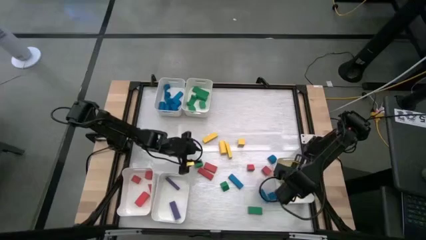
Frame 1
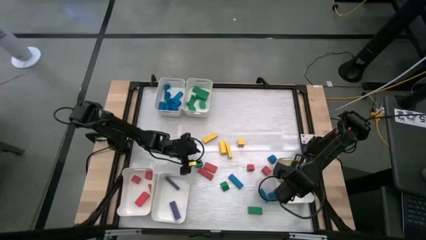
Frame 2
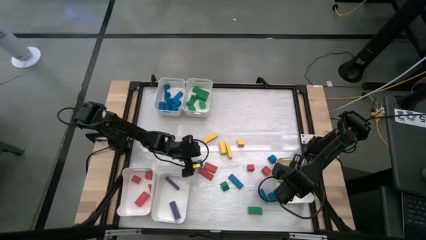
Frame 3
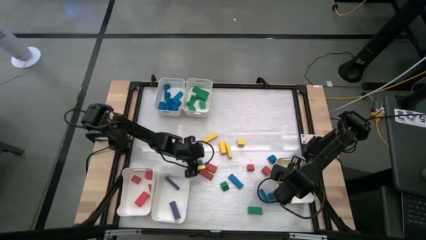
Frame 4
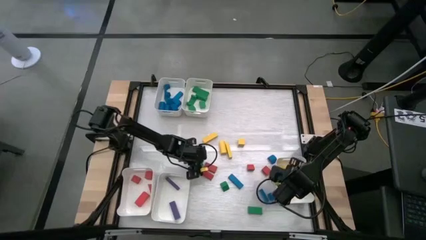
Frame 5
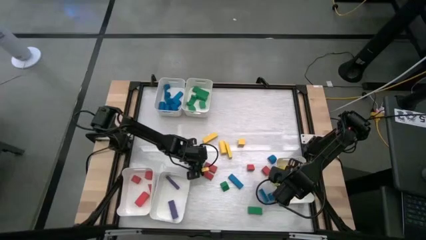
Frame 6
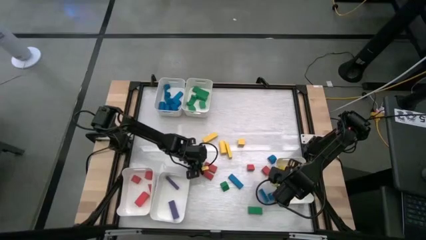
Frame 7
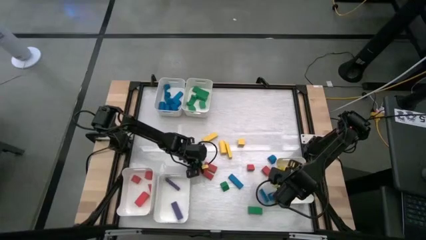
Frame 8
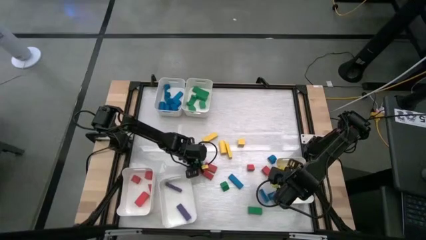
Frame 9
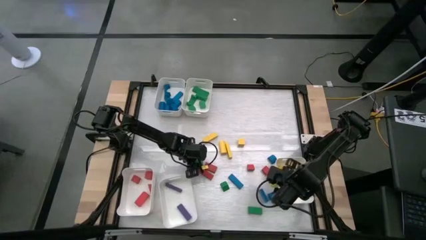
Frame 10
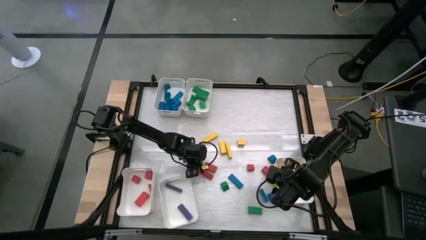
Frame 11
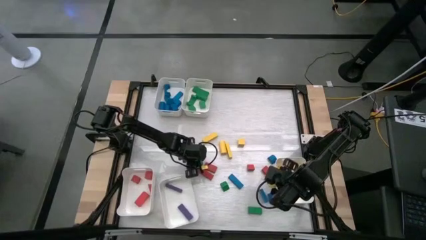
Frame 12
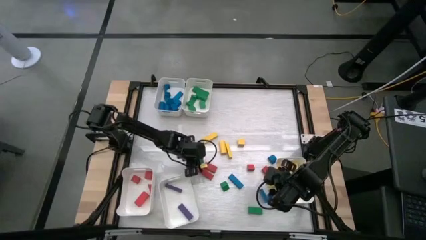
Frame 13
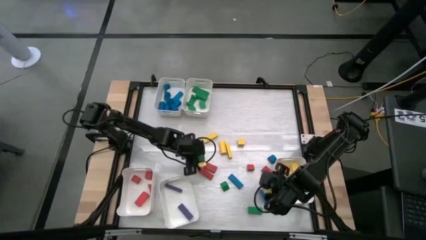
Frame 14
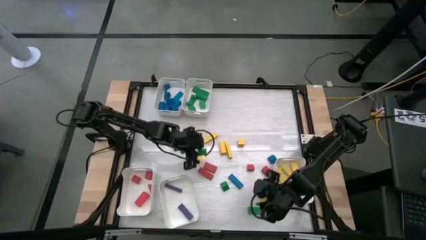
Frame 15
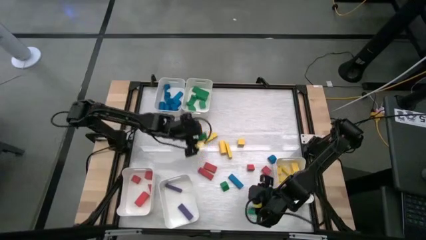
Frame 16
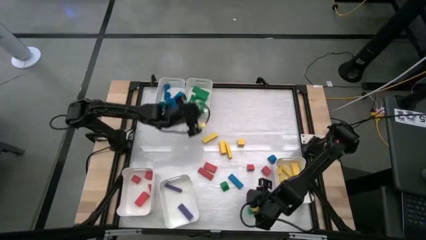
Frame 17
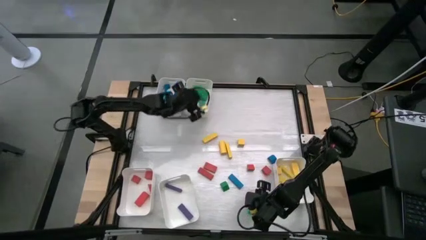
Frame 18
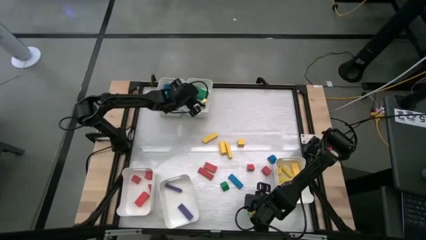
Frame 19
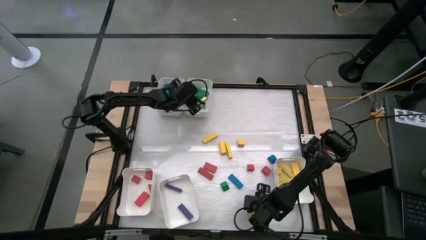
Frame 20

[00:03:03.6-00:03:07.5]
Task: Sort blocks
Put the green block into the top right white bin

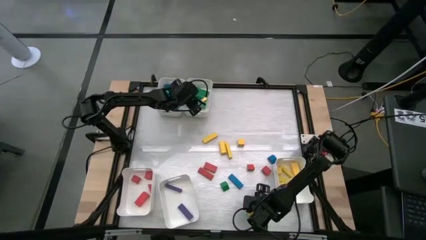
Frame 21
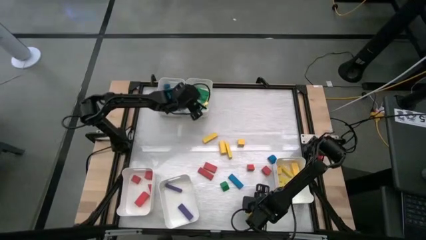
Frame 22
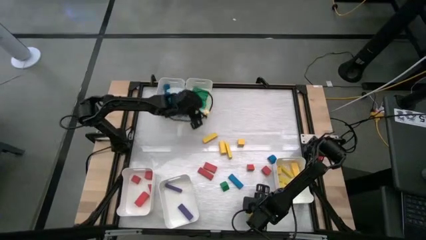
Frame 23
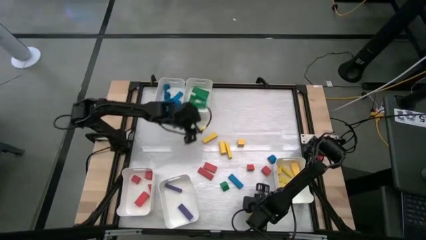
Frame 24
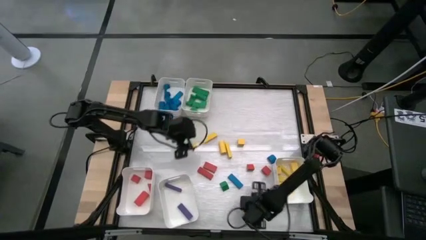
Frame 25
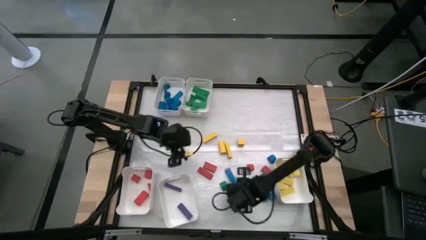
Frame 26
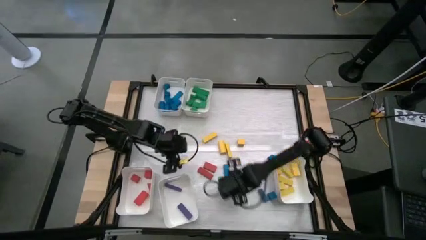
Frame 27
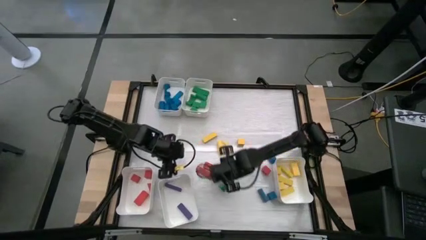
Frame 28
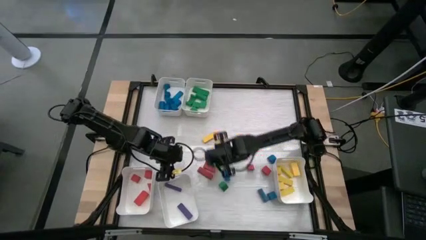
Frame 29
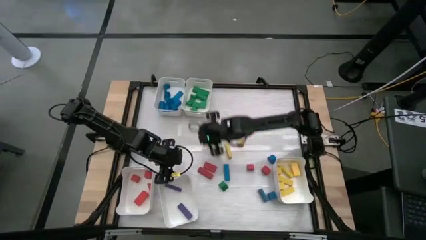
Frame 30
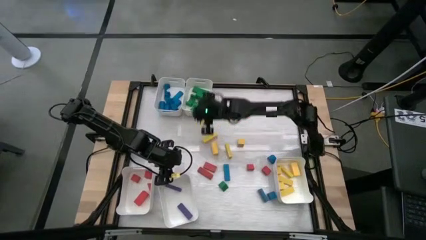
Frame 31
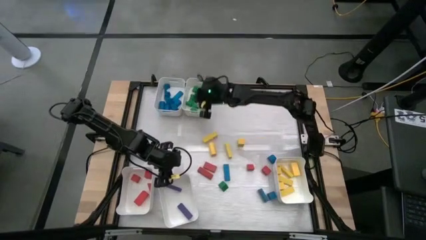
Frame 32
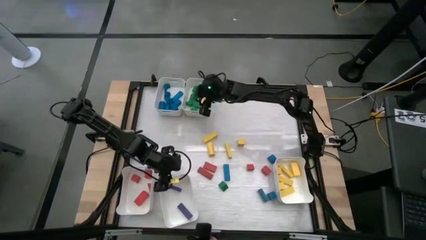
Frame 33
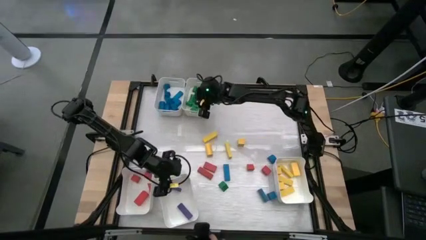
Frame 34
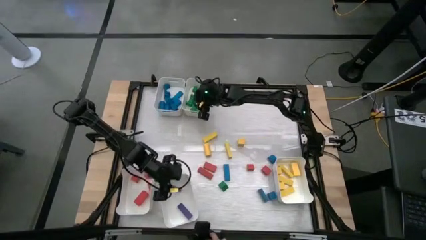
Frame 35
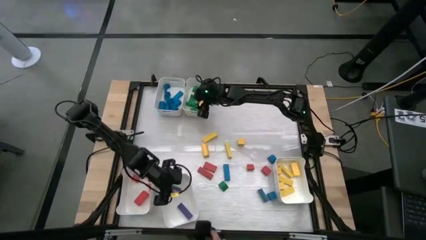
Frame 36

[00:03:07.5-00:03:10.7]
Put the green block into the top right white bin

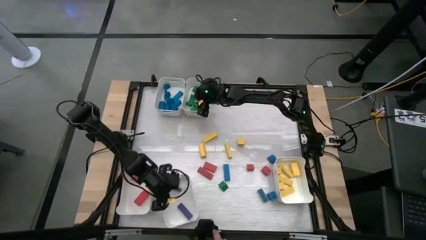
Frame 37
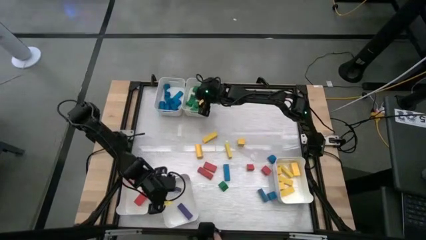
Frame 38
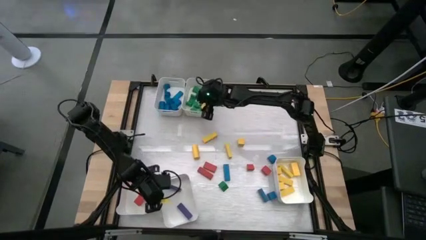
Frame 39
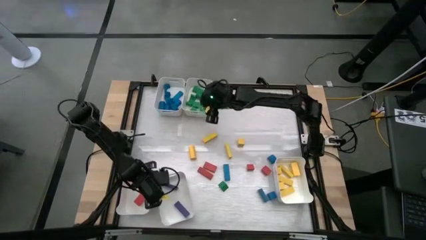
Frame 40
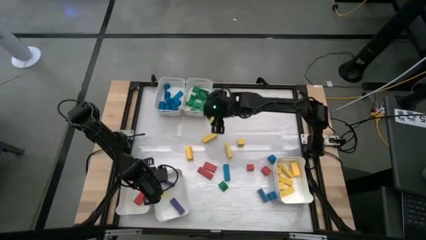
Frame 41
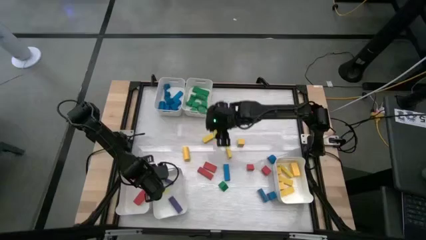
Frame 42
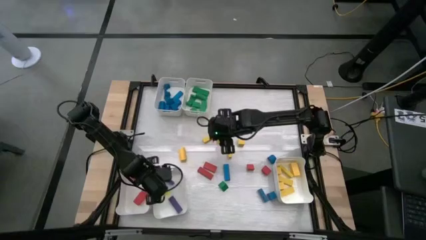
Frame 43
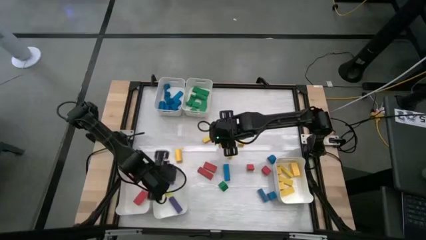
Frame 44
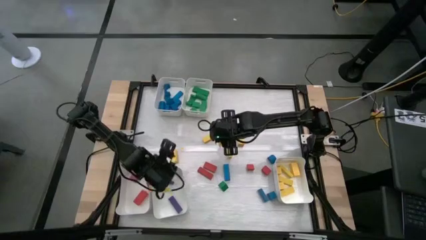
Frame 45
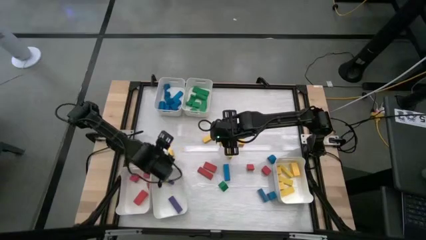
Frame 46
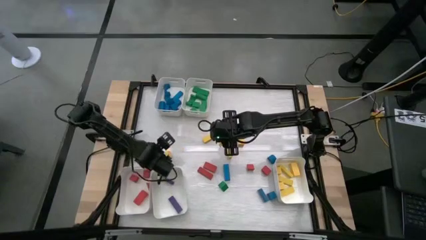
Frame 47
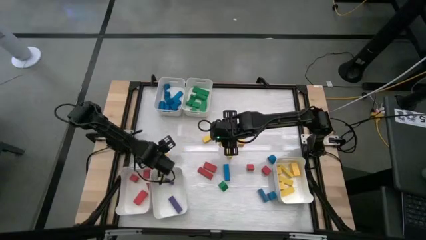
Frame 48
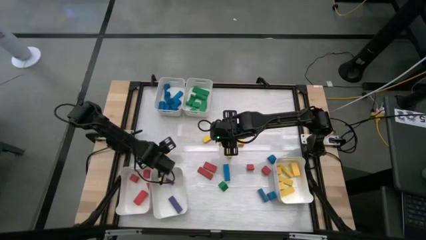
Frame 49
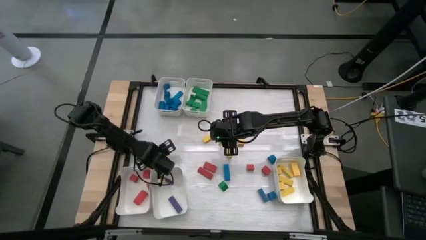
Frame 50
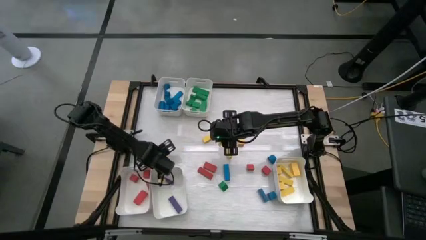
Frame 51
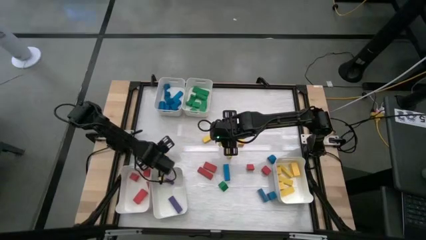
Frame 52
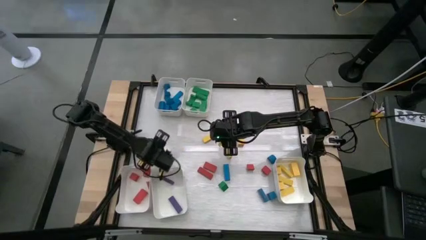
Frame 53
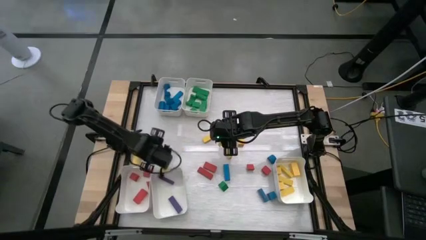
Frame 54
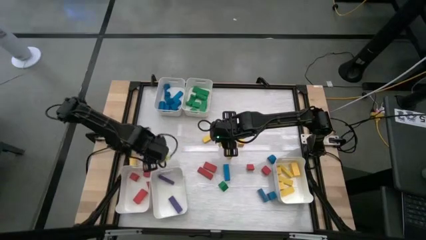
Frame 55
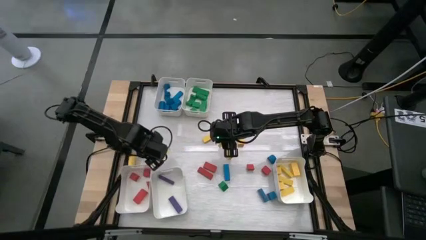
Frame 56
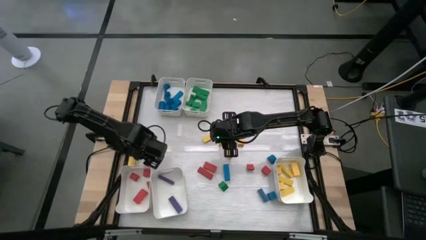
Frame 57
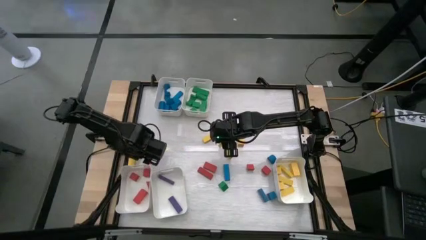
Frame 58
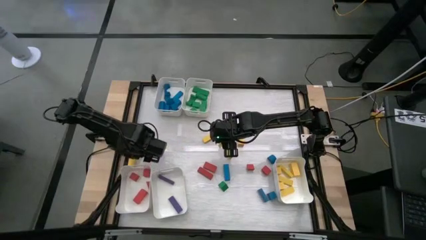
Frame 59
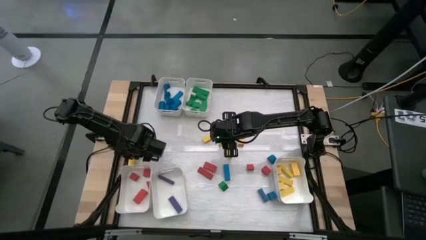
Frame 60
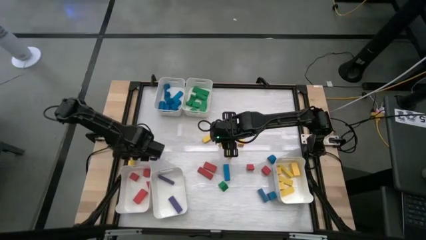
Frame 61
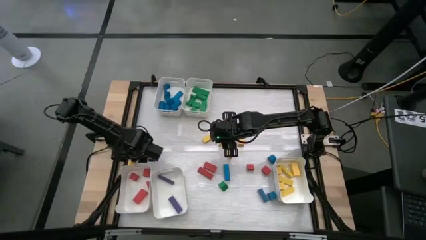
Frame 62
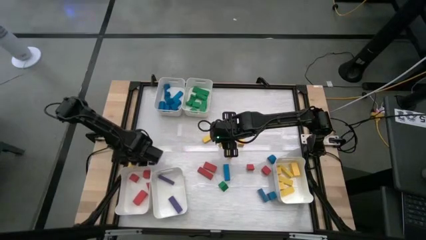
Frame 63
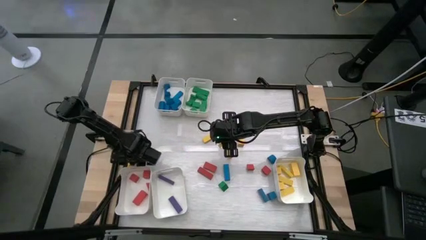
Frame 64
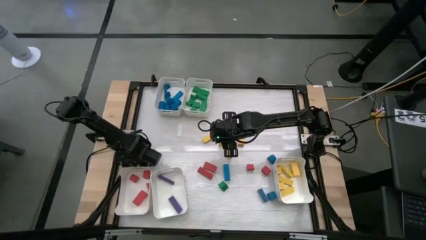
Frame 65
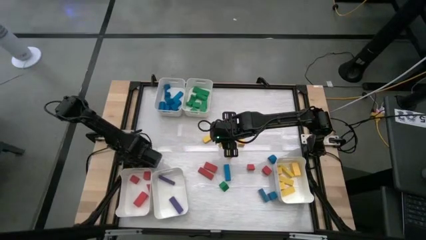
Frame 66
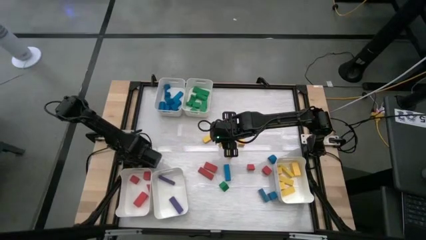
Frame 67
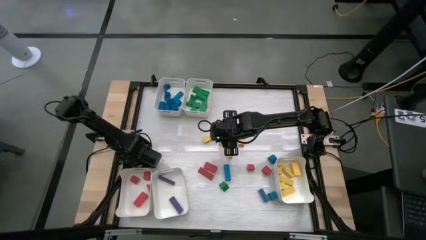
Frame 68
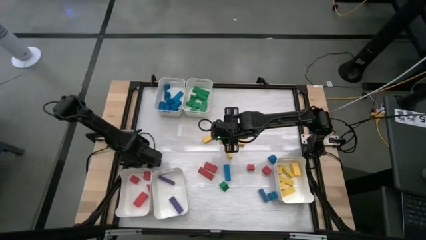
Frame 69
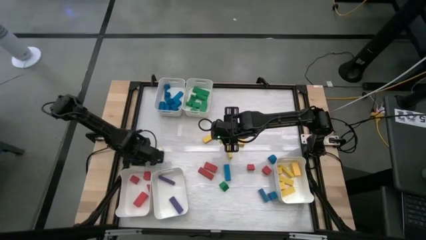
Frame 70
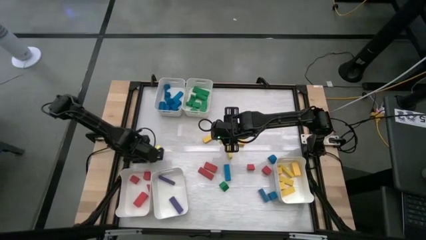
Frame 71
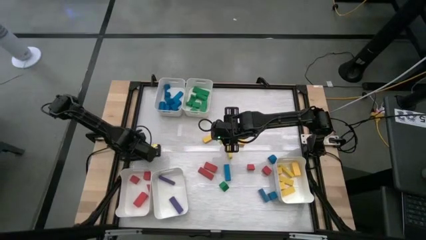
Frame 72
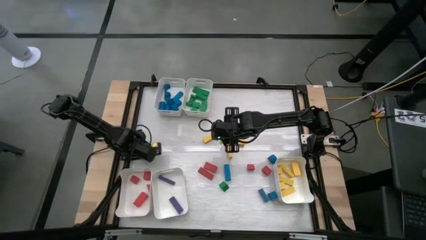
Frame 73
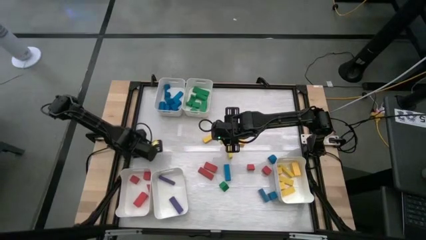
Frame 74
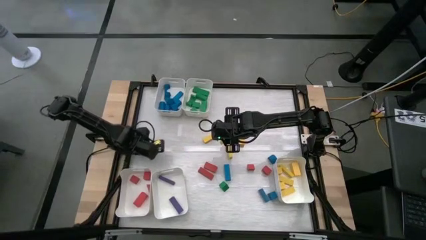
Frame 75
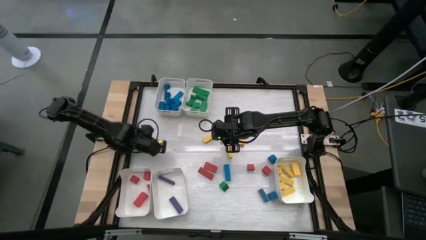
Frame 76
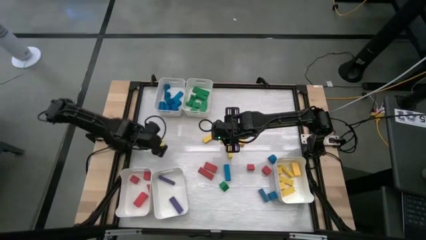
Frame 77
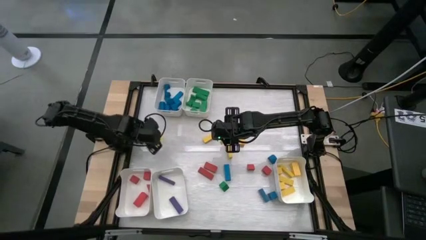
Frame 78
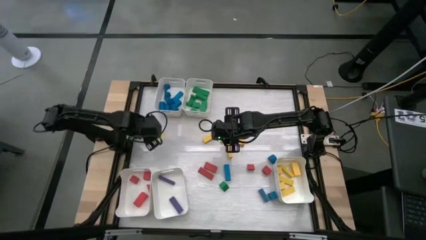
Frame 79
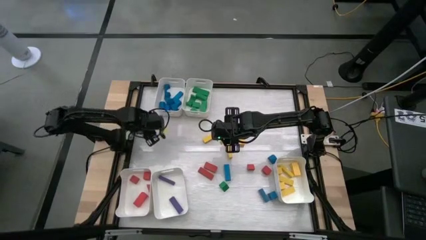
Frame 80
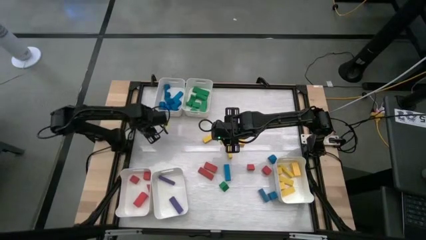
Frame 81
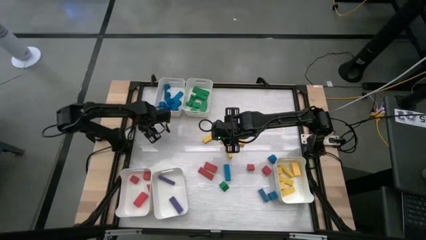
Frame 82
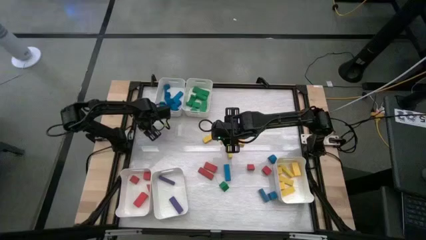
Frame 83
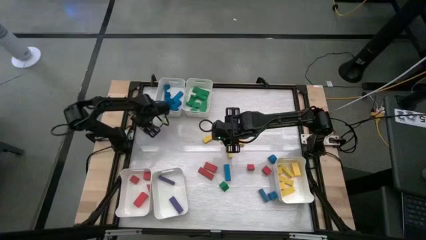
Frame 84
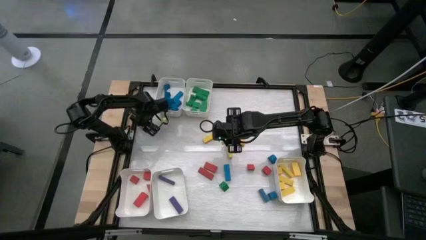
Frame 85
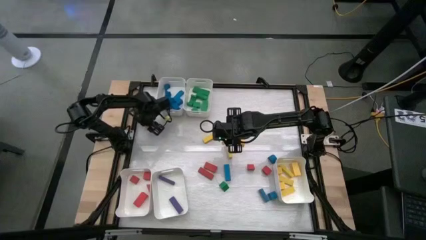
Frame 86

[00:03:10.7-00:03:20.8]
Put the yellow block into the bottom right white bin
